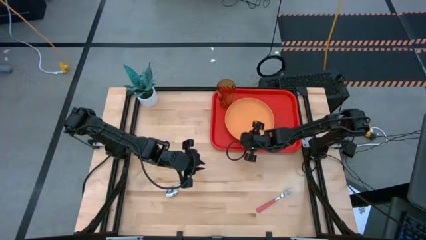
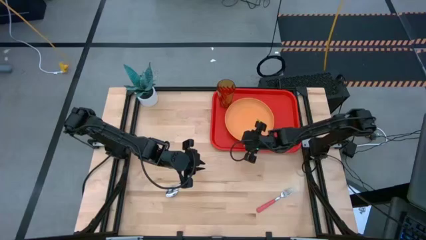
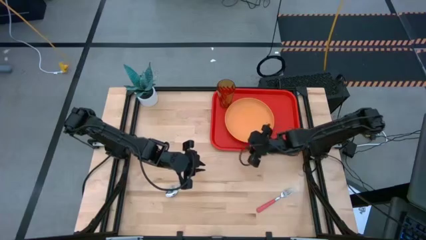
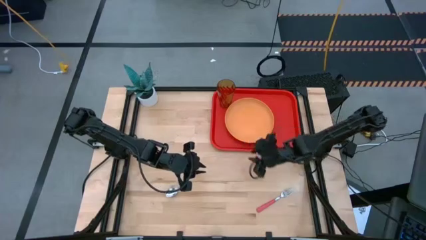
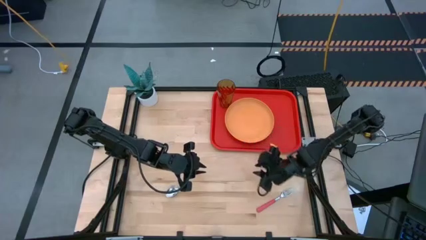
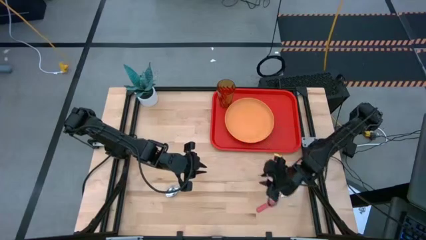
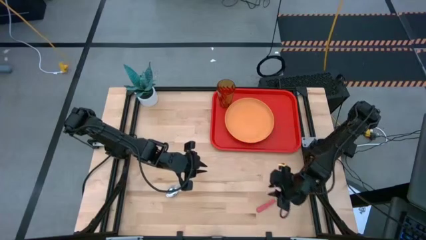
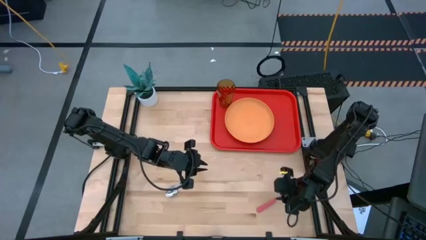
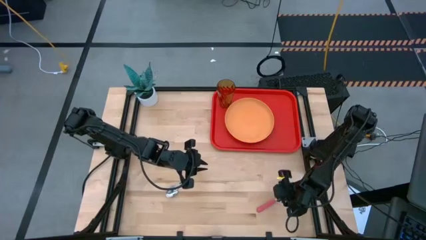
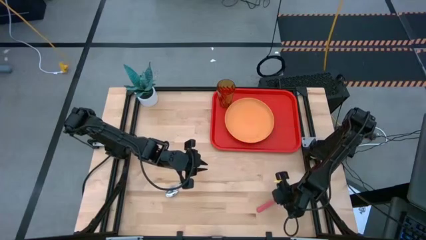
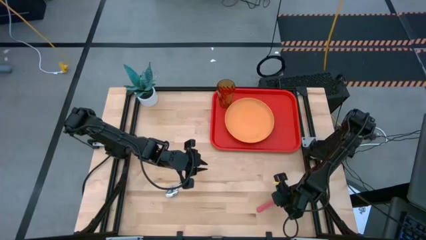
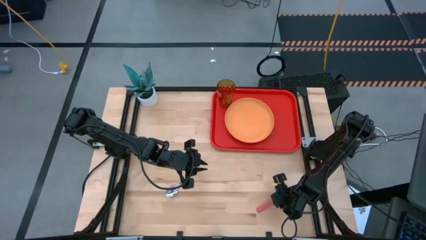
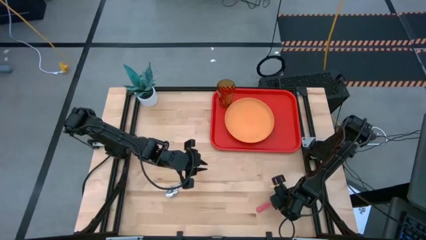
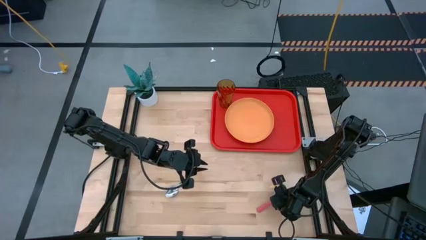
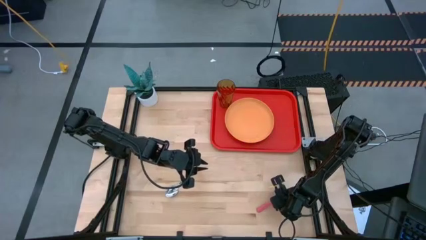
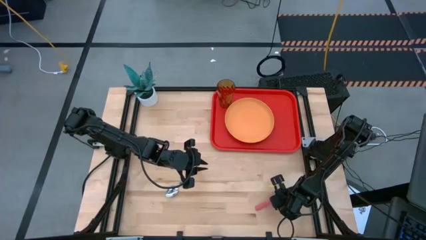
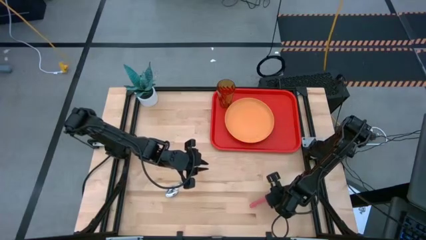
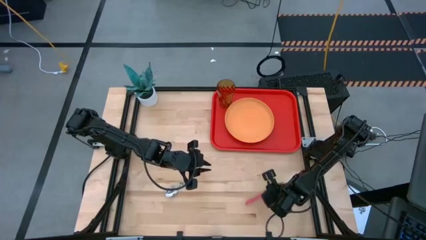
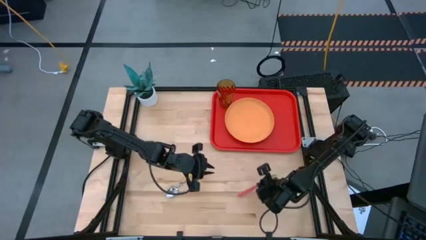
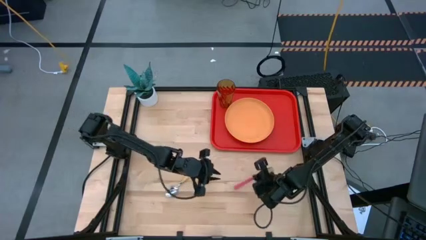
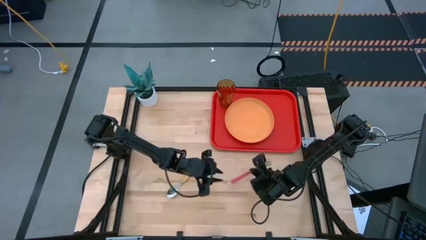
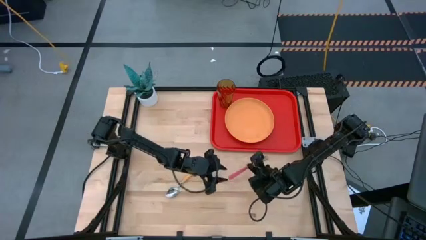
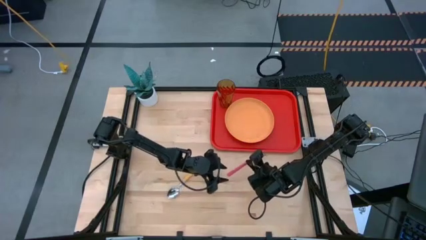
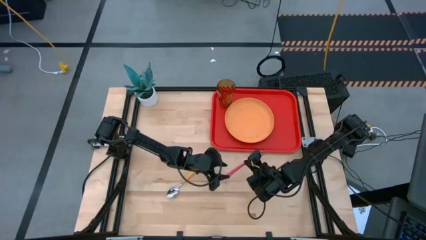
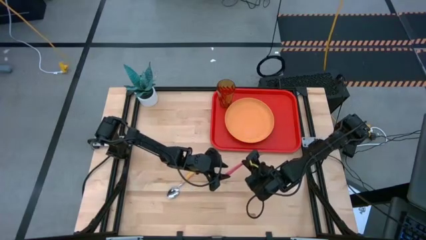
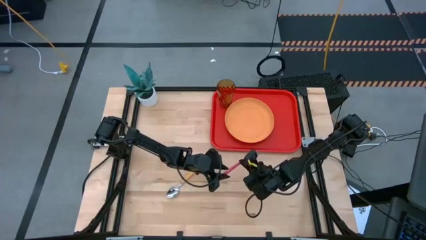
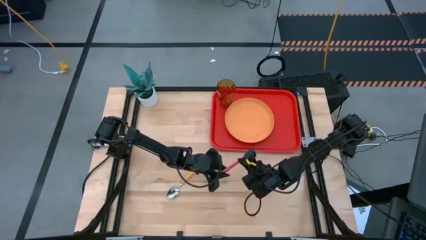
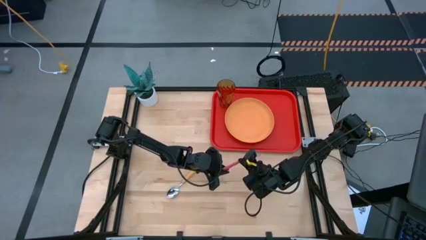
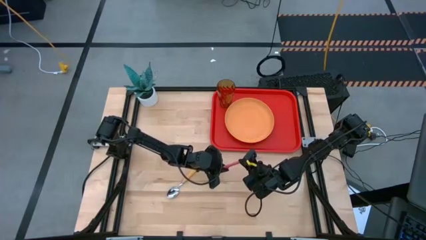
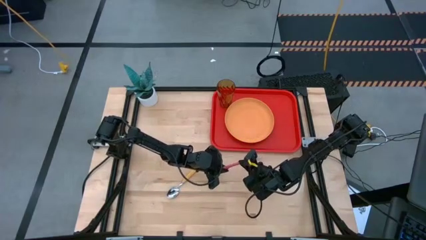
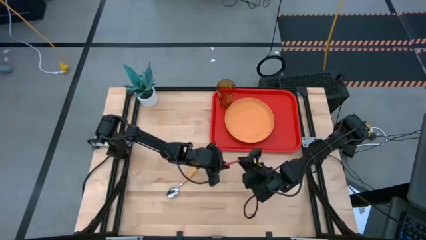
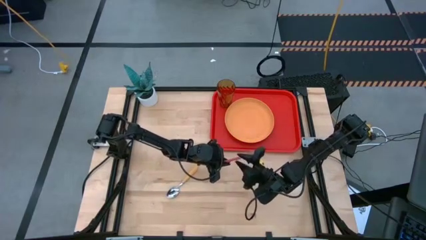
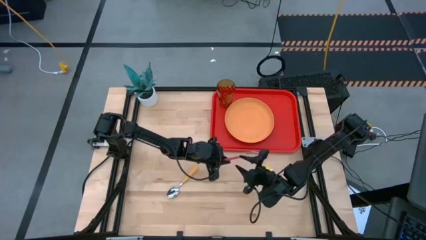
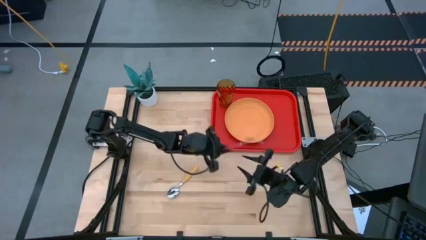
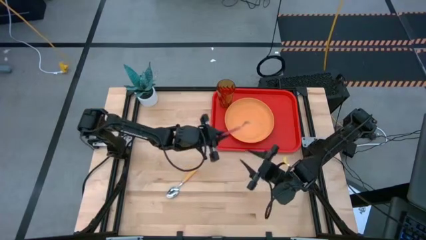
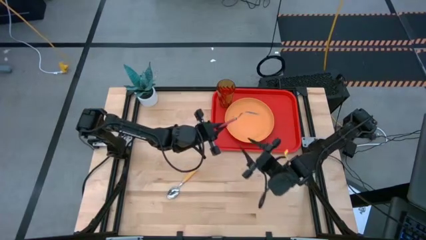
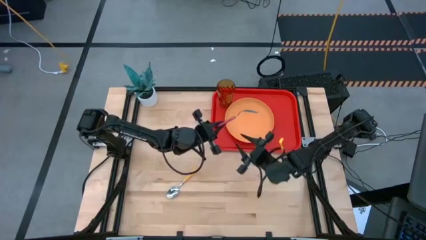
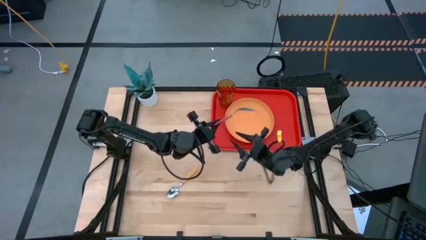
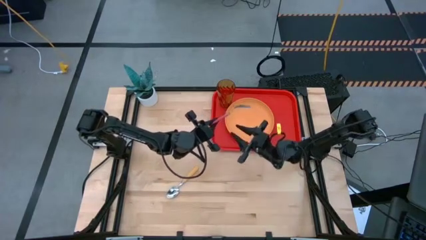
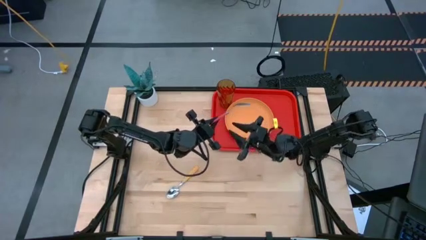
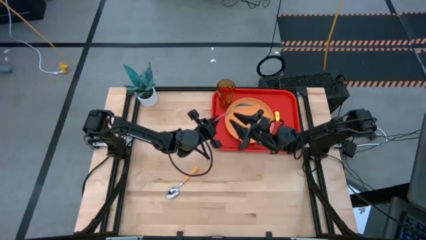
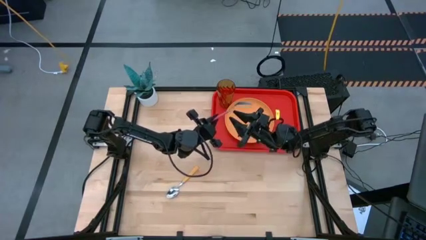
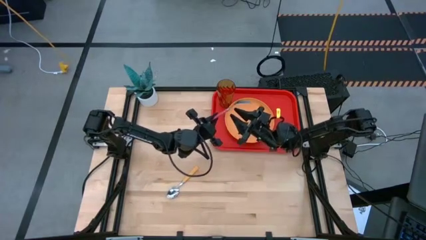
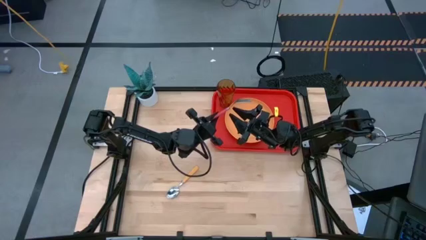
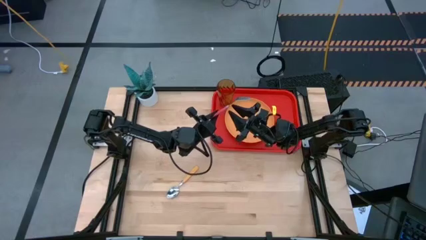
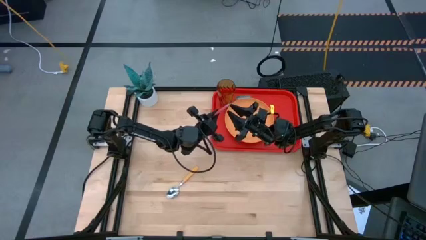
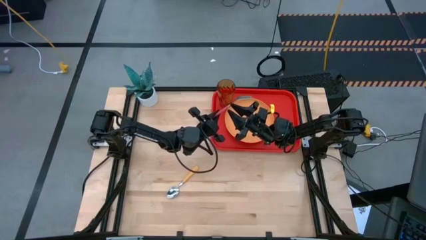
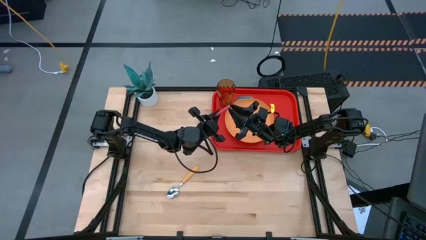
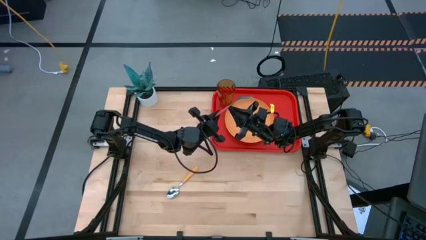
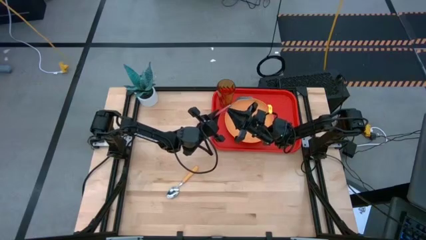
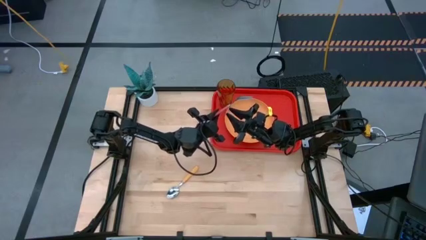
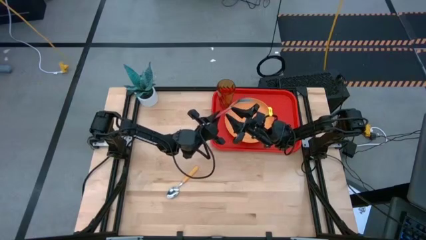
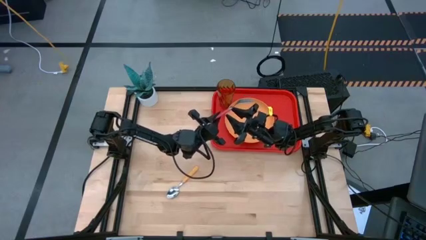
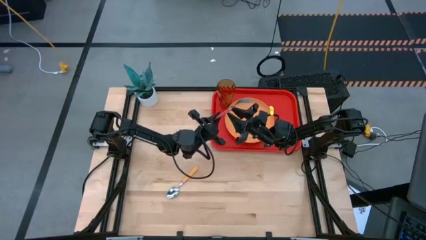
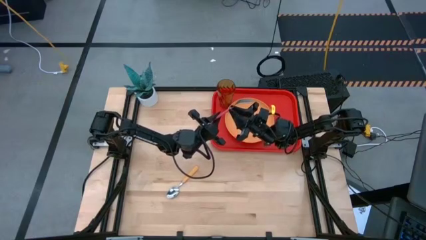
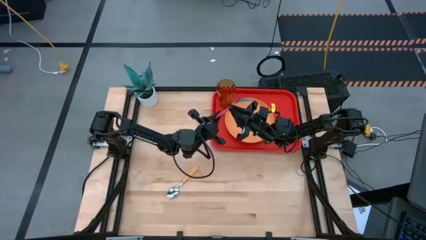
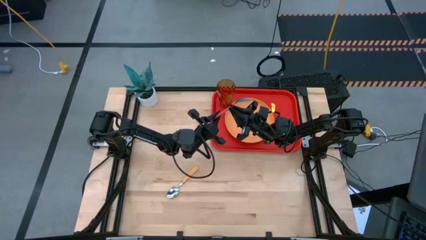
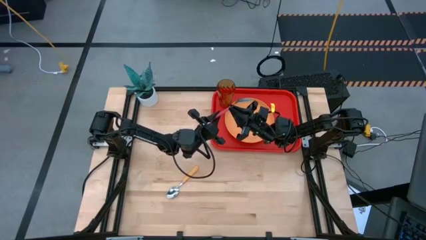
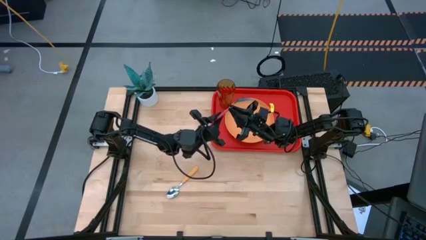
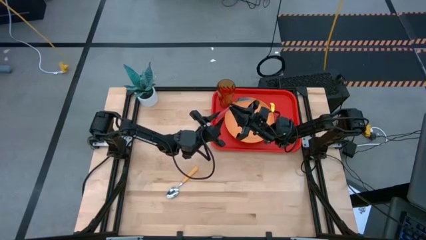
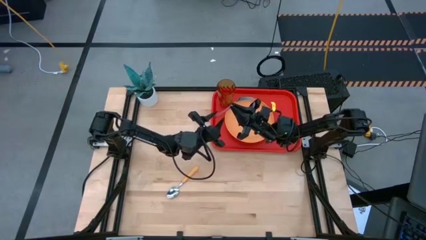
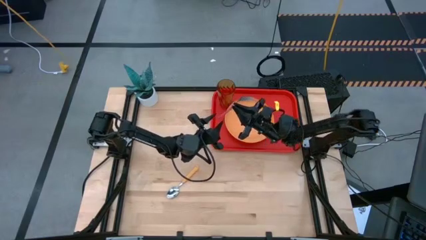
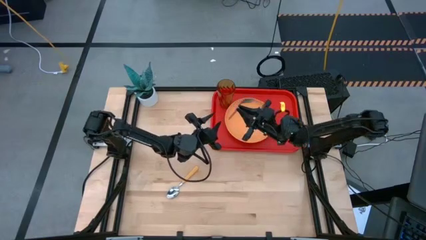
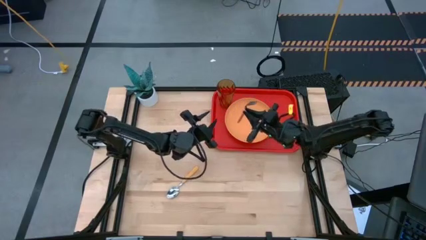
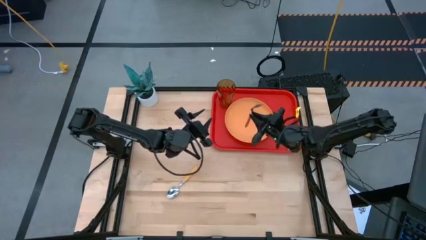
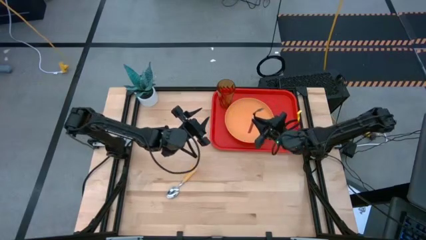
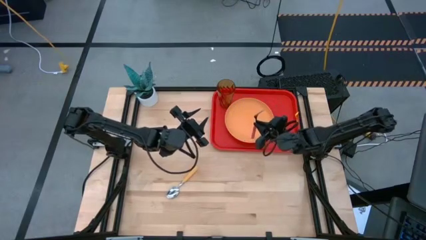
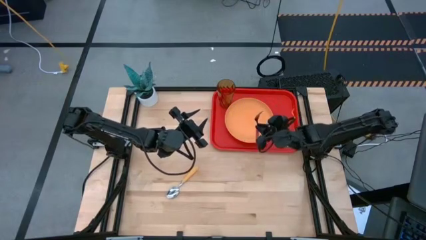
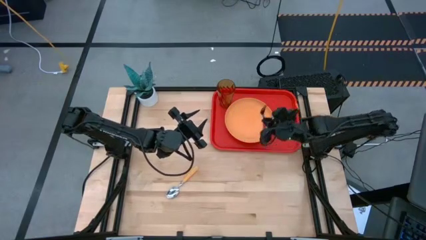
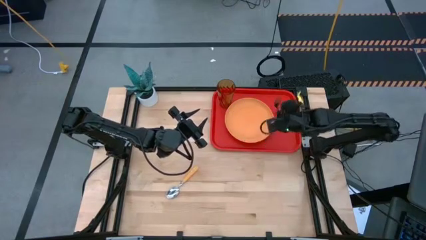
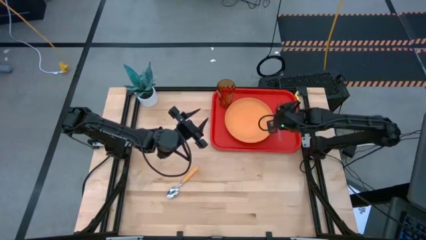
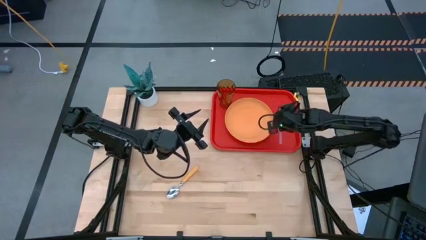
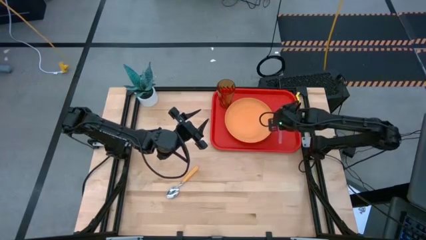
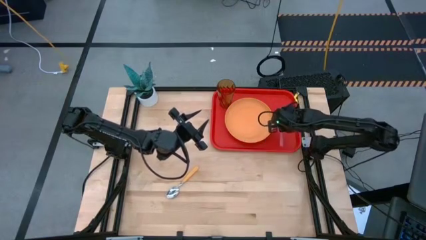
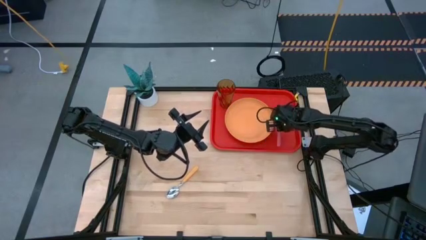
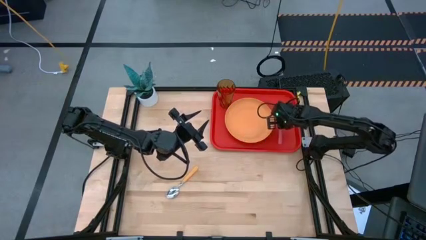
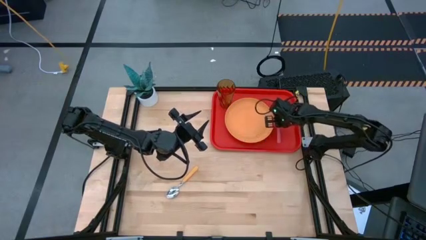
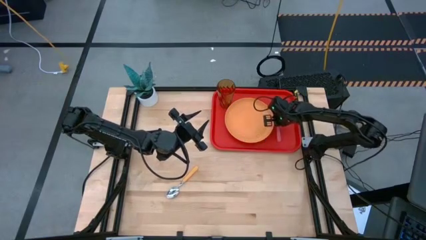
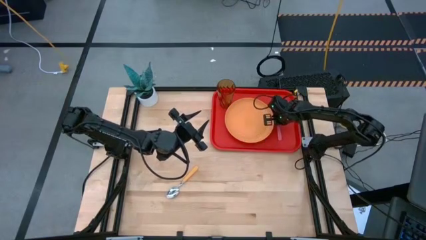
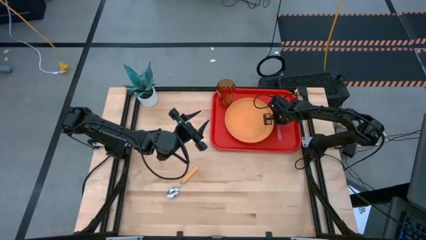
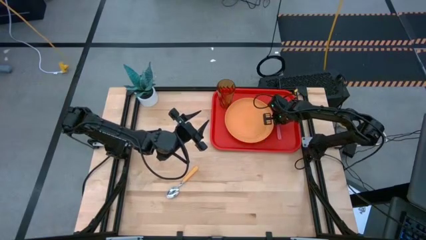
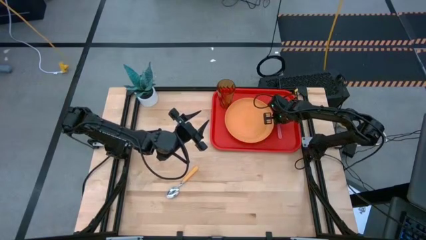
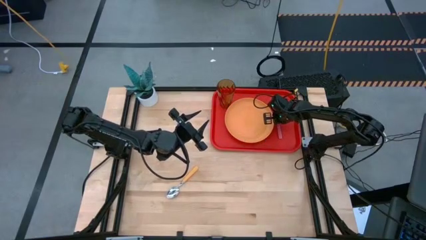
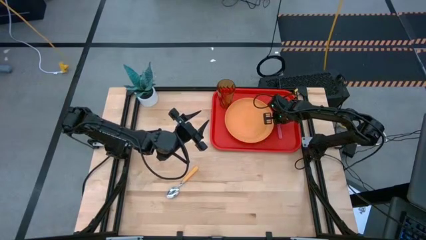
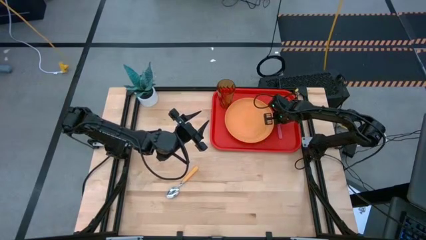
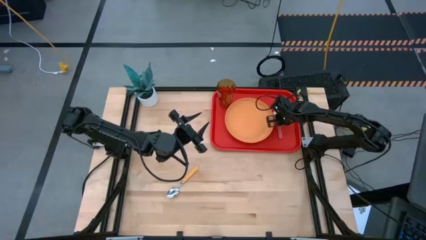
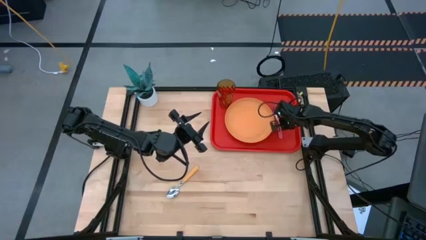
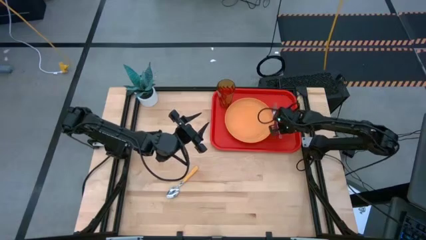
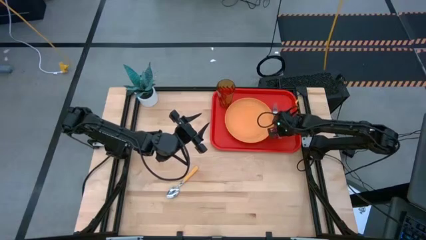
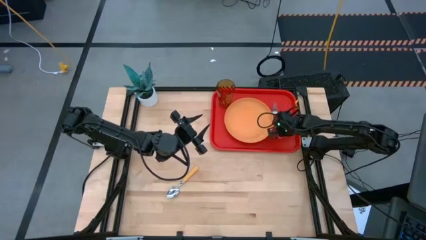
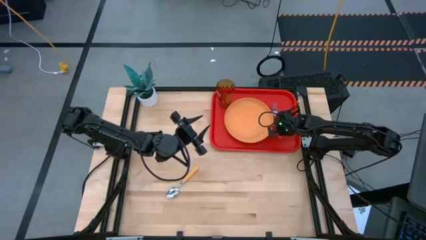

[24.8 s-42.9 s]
Task: Pick and place plate/cup/fork/spoon on tray
Put the pink fork on the red serving tray to the right of the orange plate
